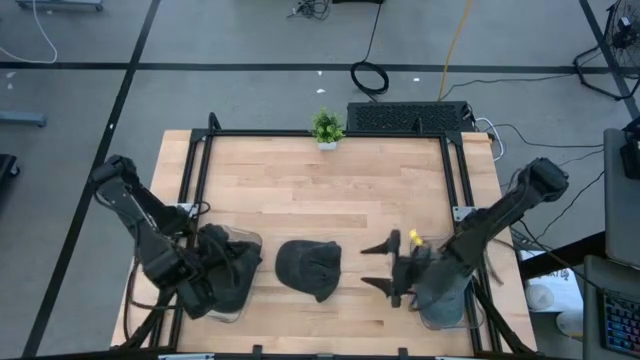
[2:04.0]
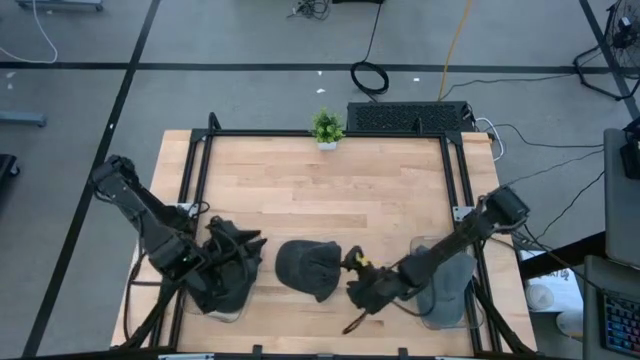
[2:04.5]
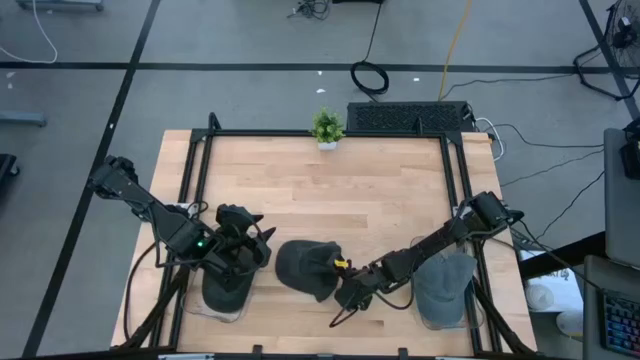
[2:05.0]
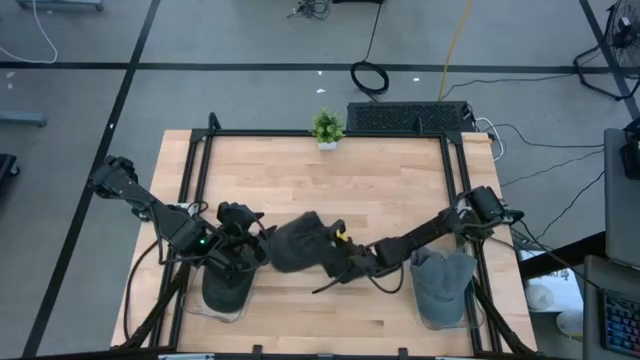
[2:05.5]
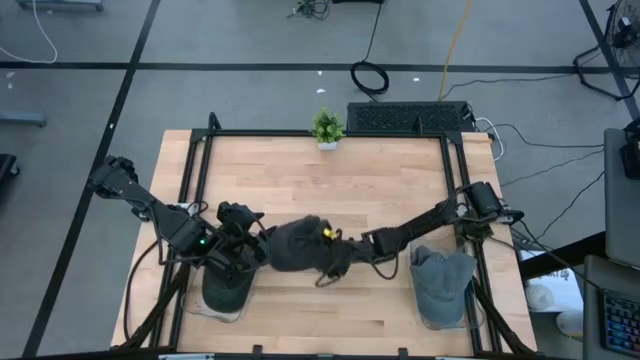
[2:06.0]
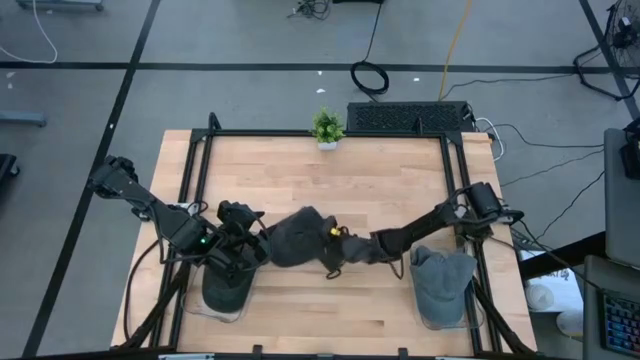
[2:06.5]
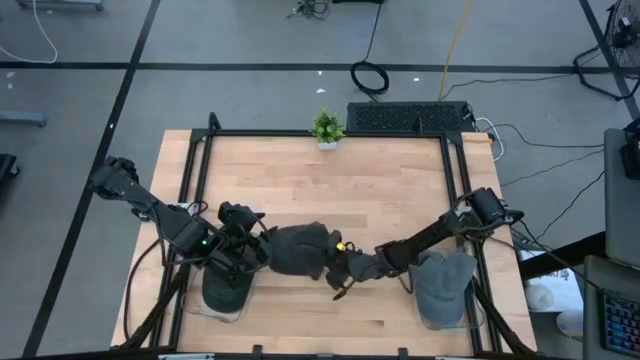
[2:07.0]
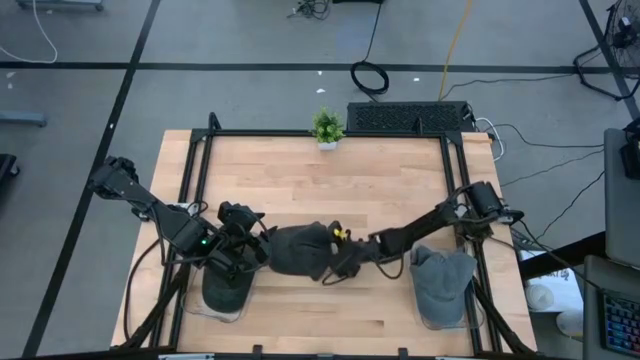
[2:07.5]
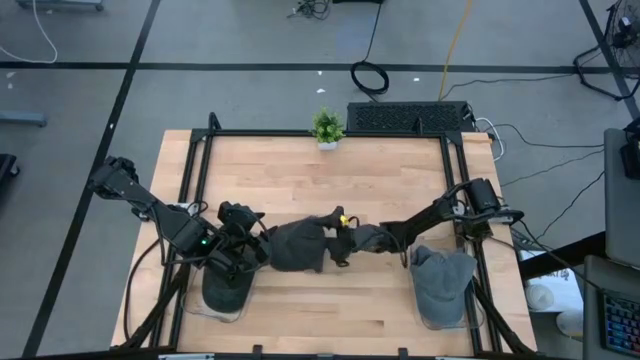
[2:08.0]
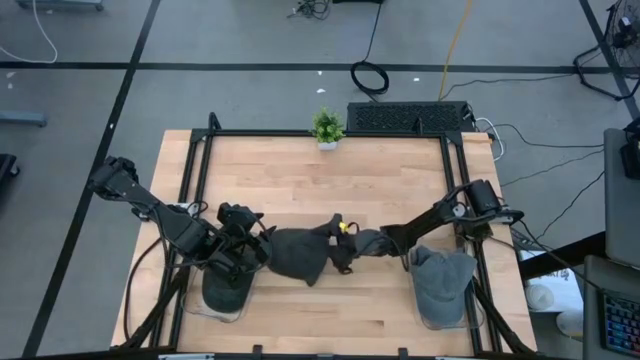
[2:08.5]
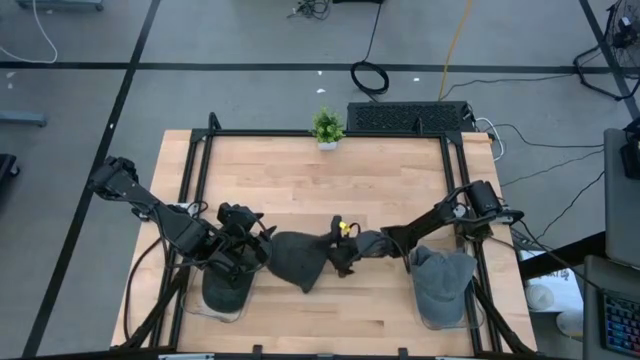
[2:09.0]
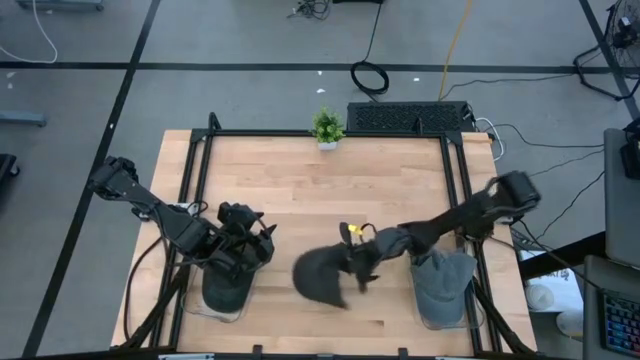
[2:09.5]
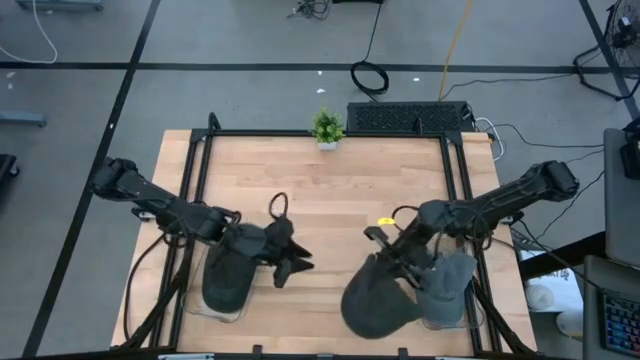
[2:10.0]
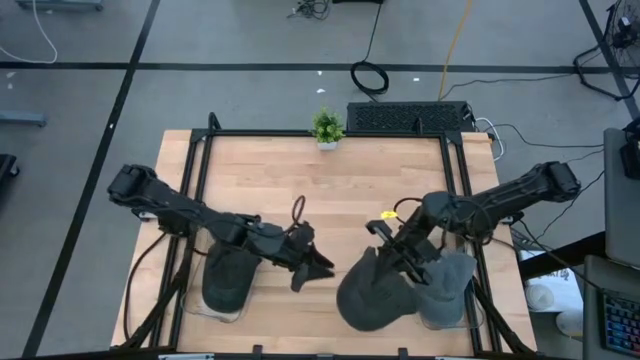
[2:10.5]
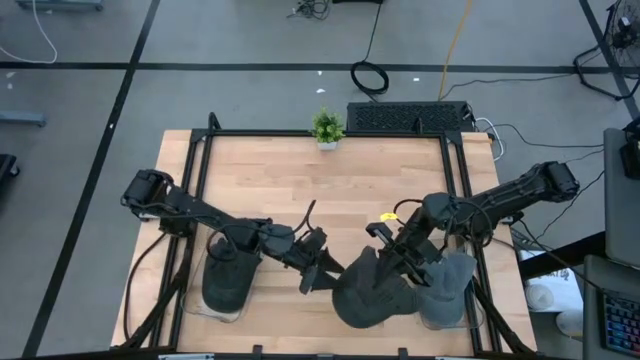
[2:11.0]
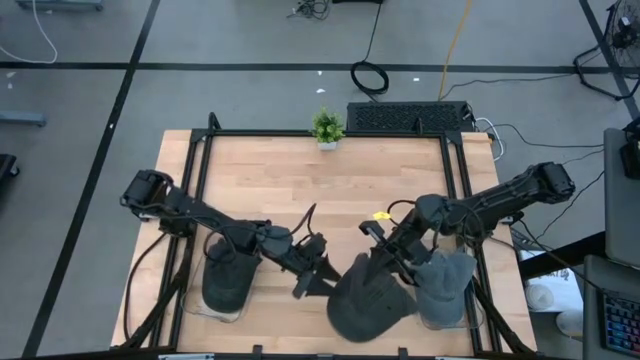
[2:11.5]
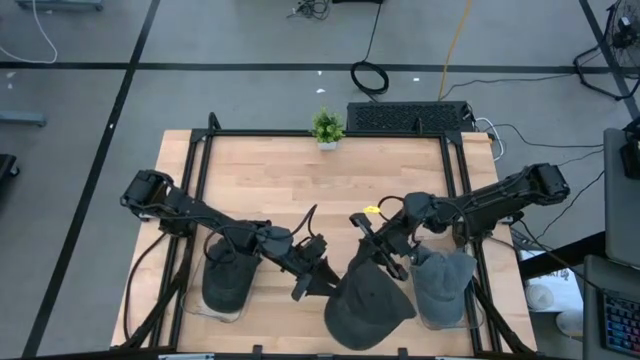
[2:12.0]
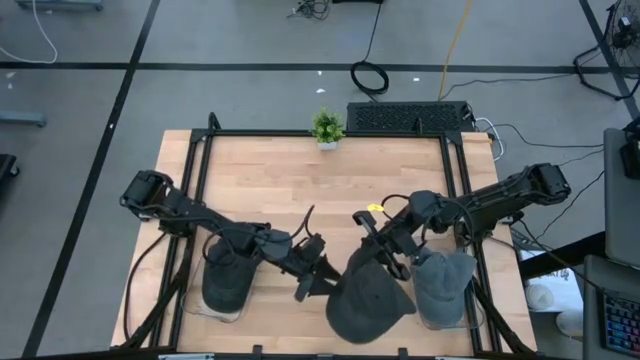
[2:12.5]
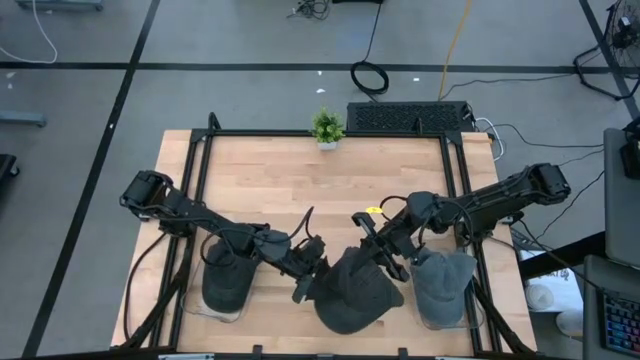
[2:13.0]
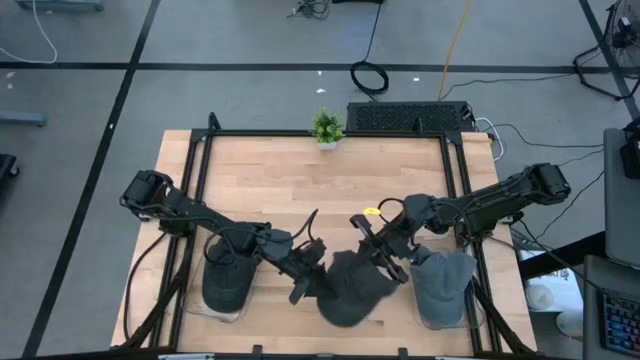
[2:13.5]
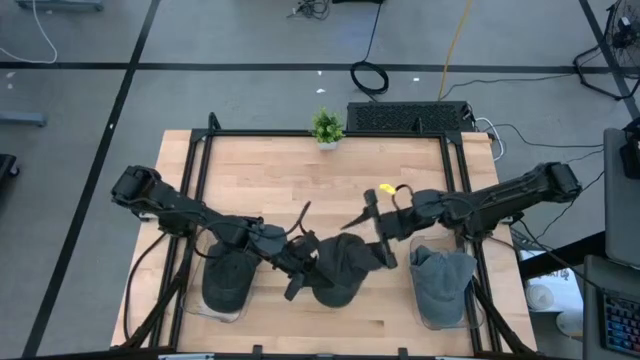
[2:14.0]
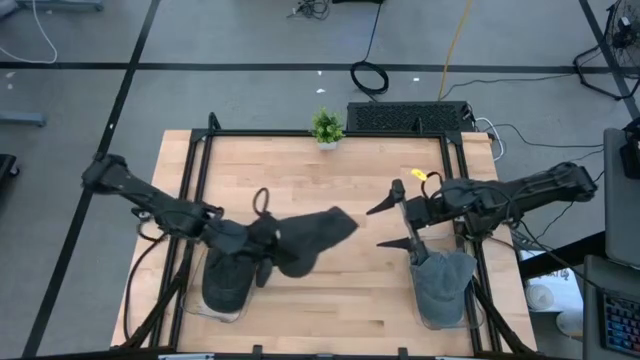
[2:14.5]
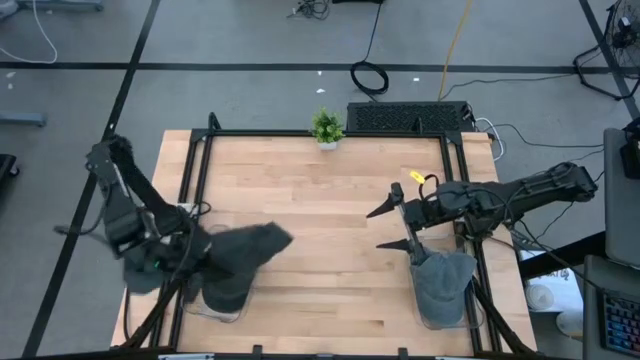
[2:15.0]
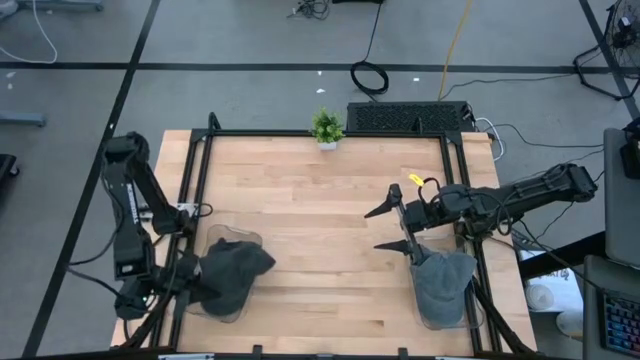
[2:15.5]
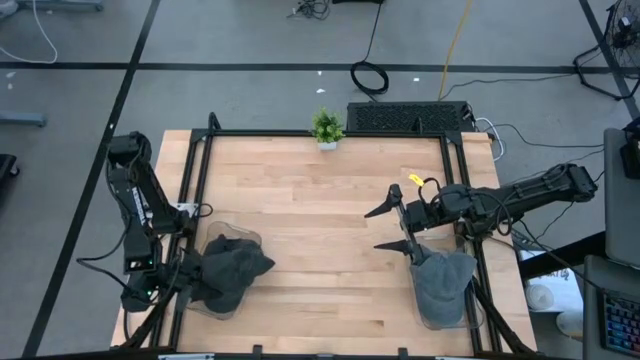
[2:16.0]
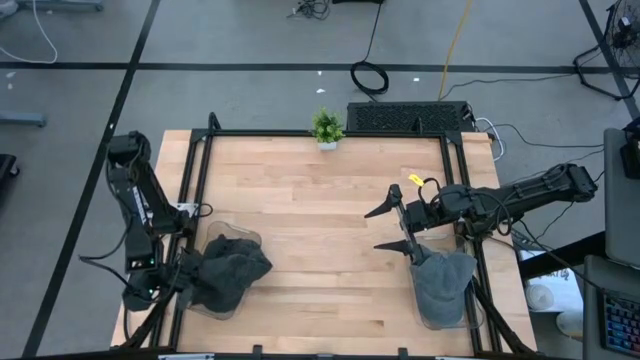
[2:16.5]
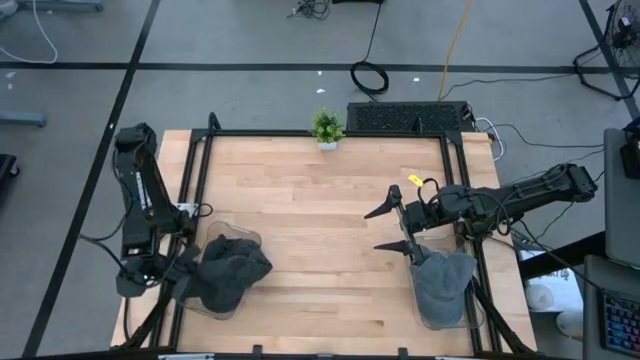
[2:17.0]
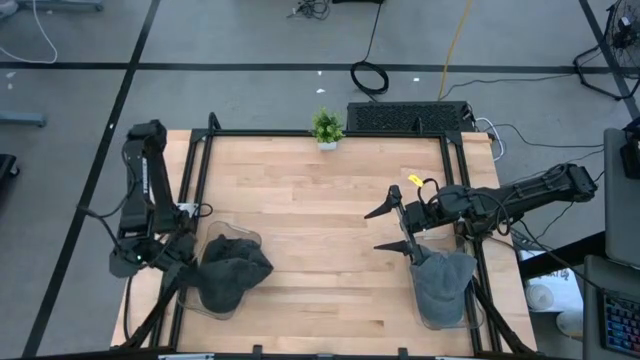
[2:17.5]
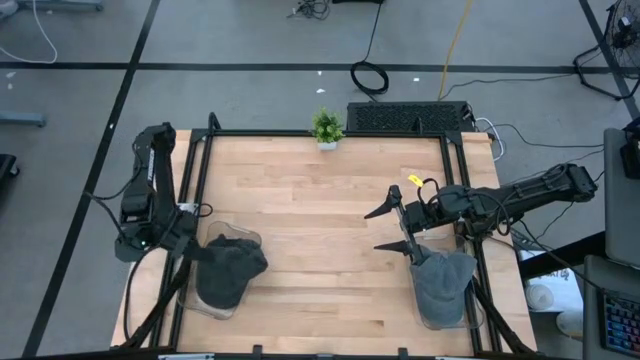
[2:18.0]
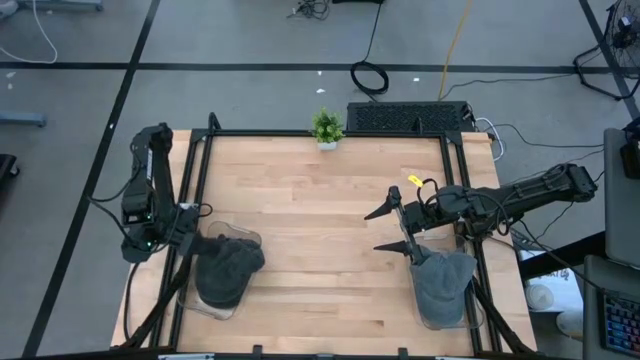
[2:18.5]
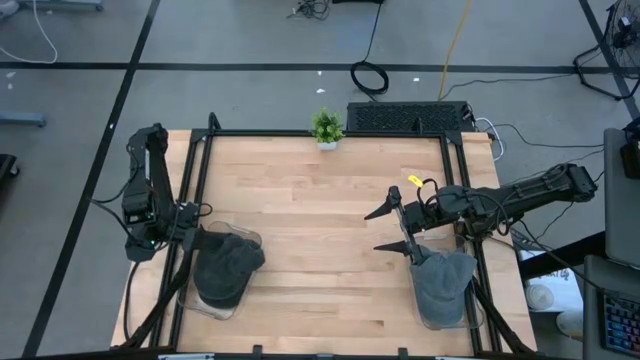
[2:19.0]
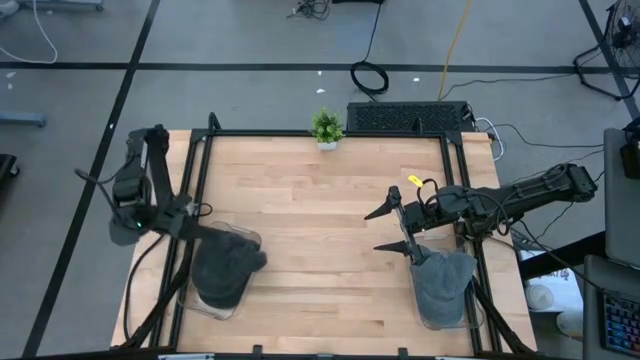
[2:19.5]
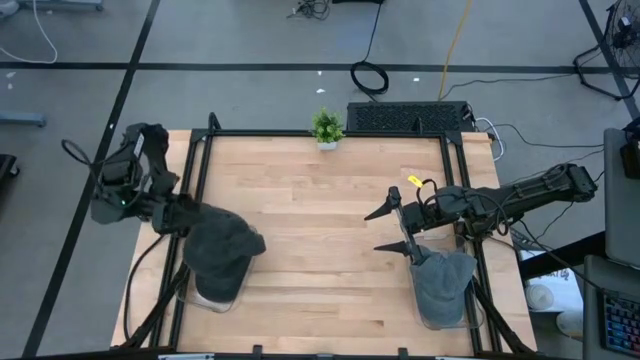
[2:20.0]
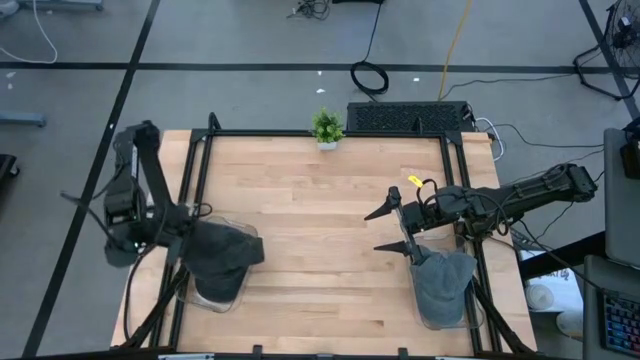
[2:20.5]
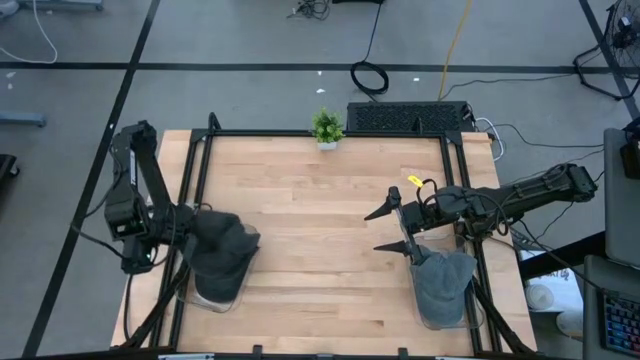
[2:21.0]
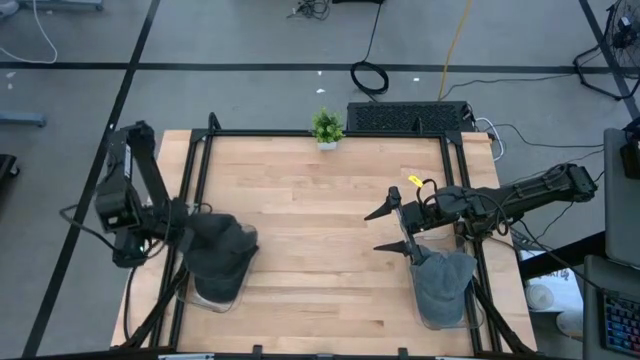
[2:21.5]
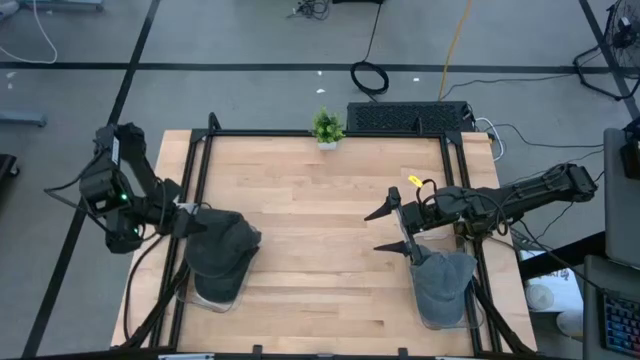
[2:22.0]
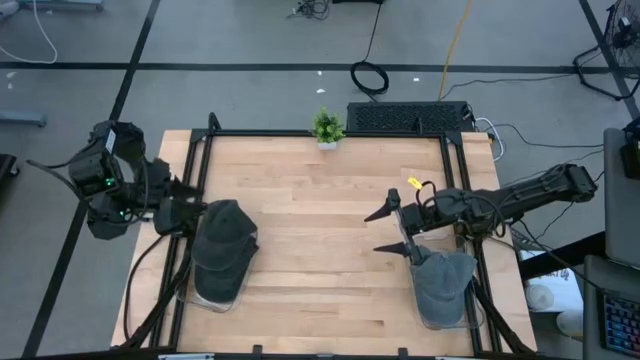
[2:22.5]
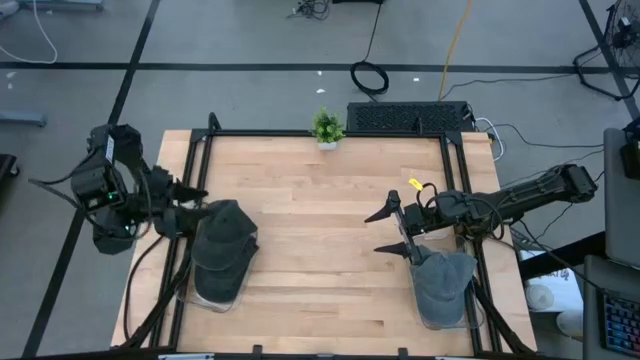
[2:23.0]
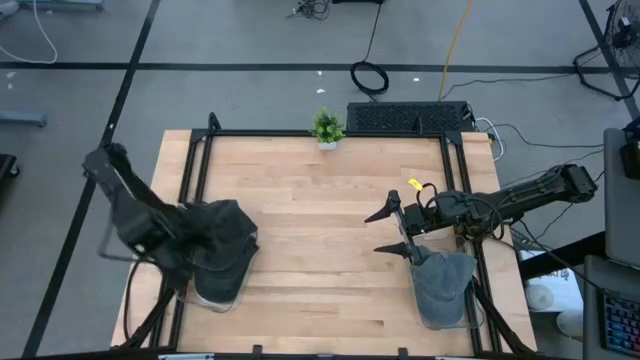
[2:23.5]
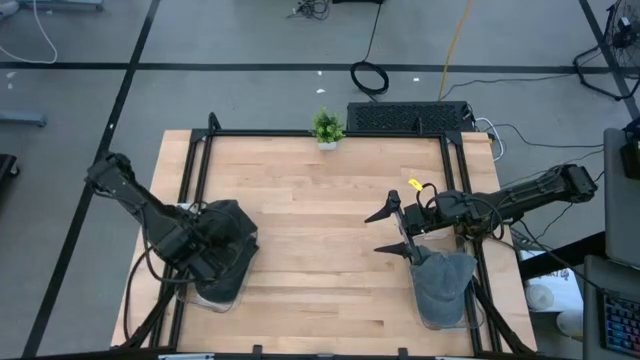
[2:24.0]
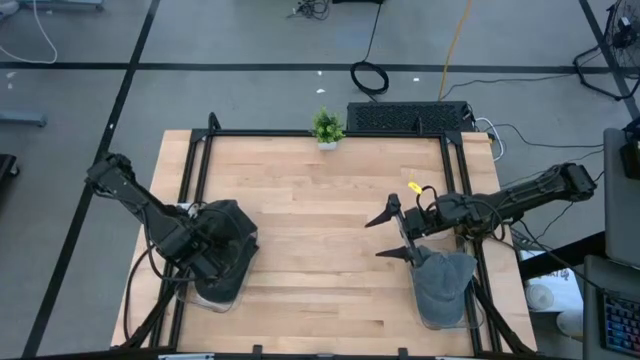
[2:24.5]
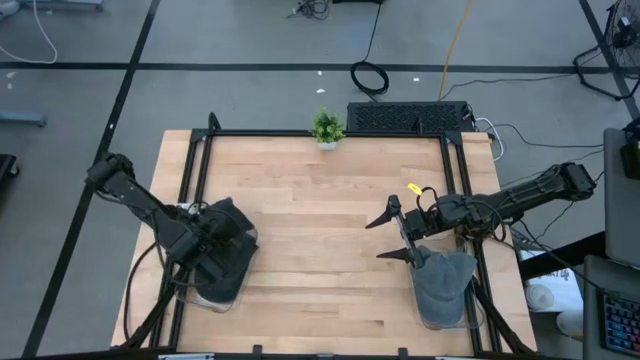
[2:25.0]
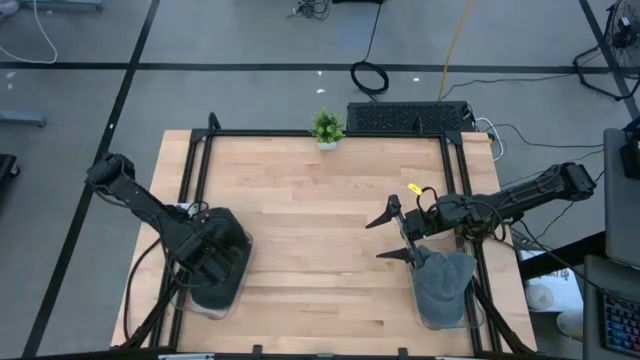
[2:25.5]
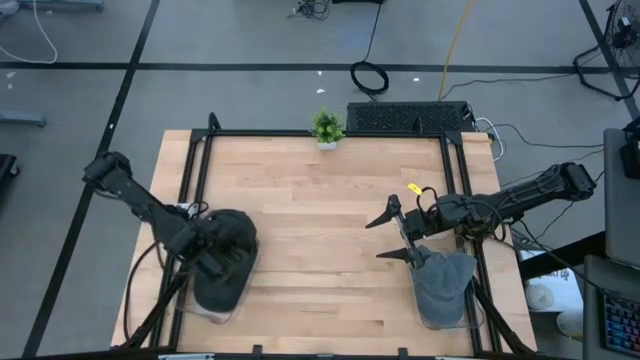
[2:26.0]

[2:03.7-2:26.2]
Task: Pick & Place hat
Put the black cap into the left transparent bin
